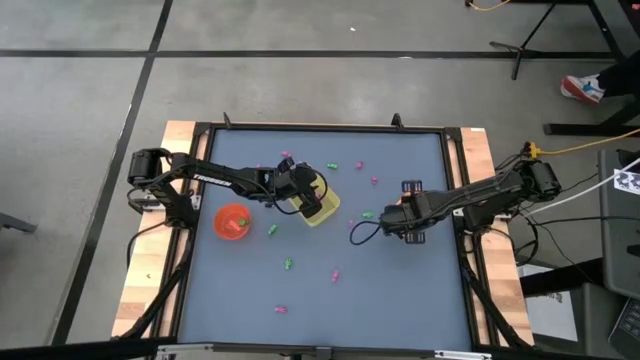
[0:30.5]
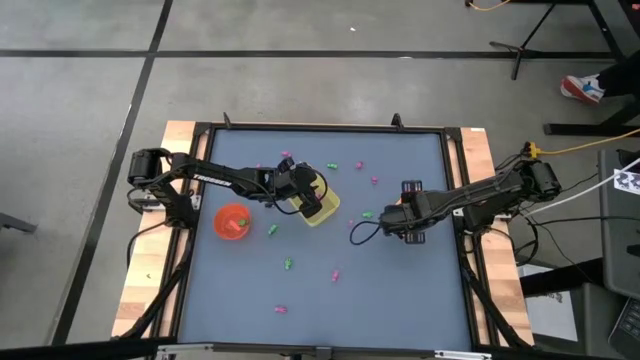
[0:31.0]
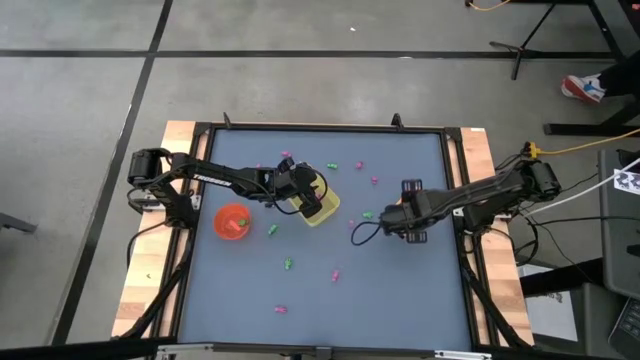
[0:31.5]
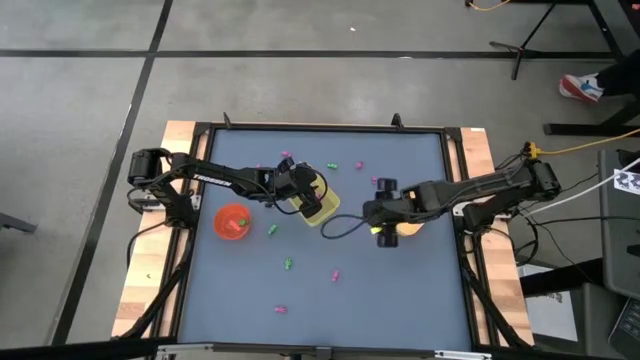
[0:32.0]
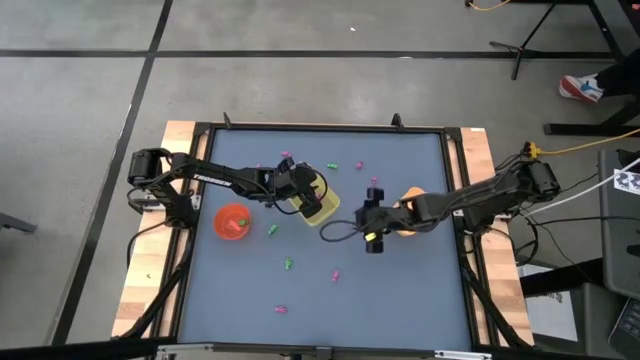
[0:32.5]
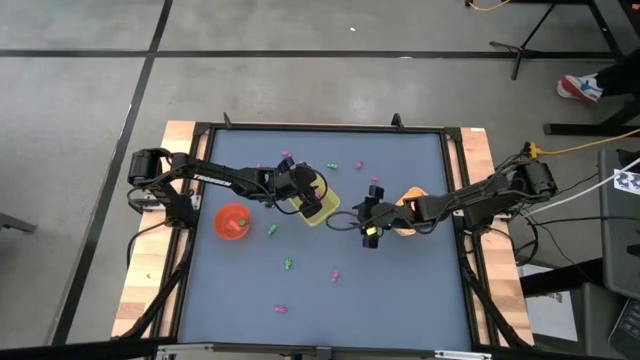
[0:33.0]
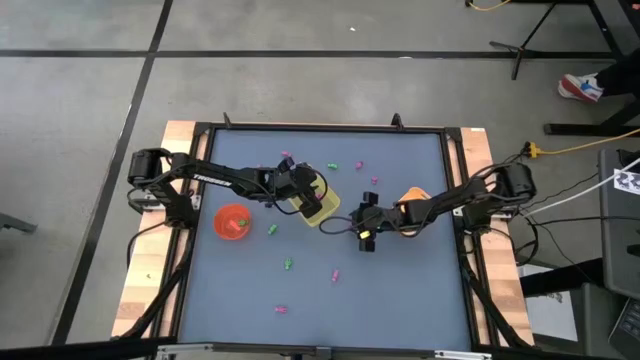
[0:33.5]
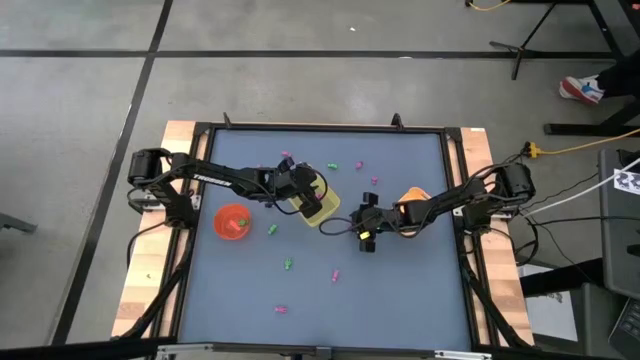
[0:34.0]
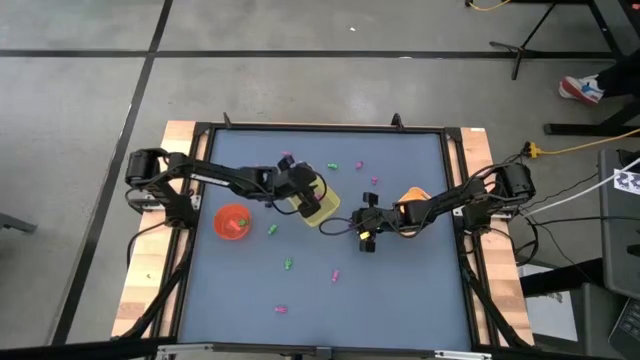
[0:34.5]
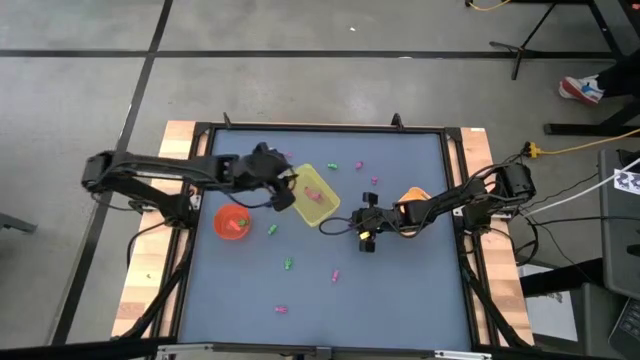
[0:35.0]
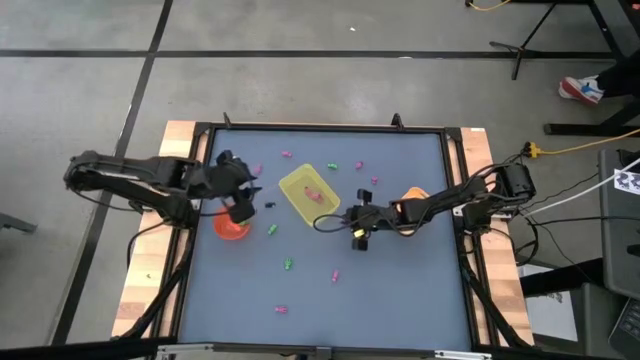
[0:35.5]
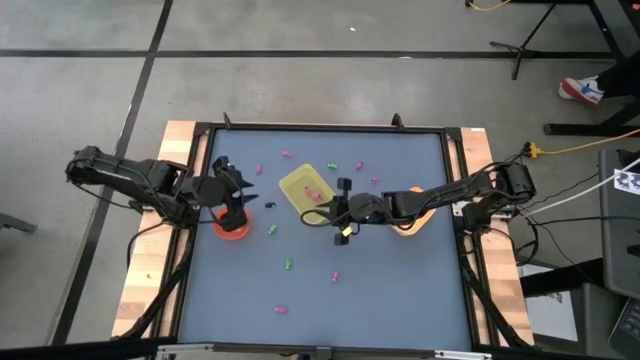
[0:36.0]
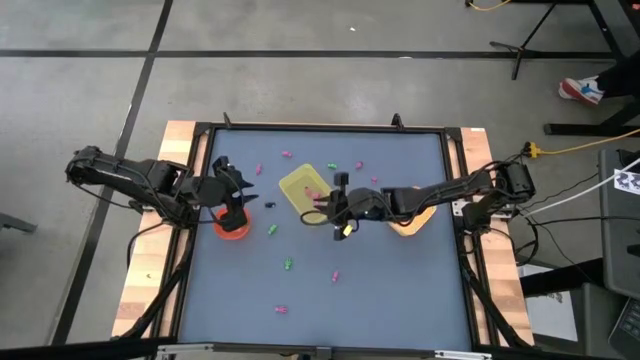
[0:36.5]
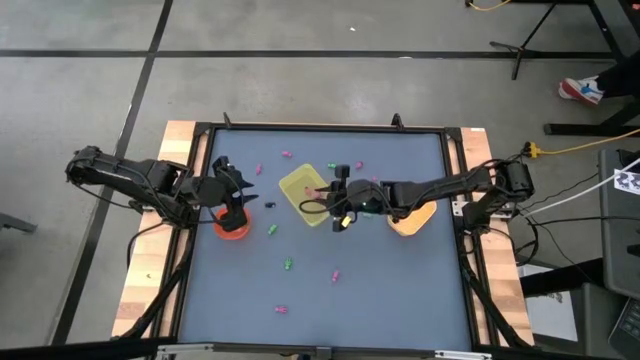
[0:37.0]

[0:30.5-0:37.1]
Task: Sort Halloween decoration
Put the pink skeleton toy into the yellow bin

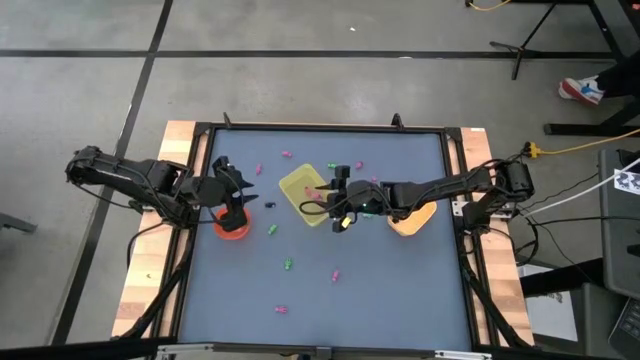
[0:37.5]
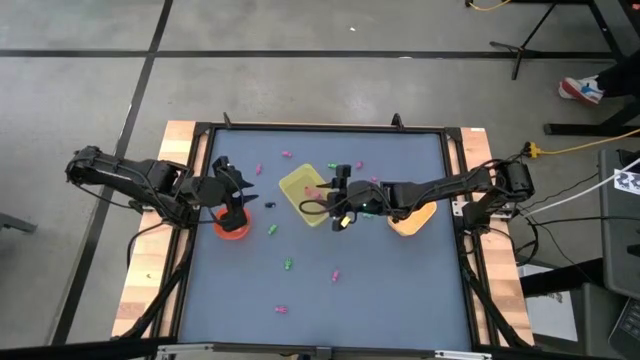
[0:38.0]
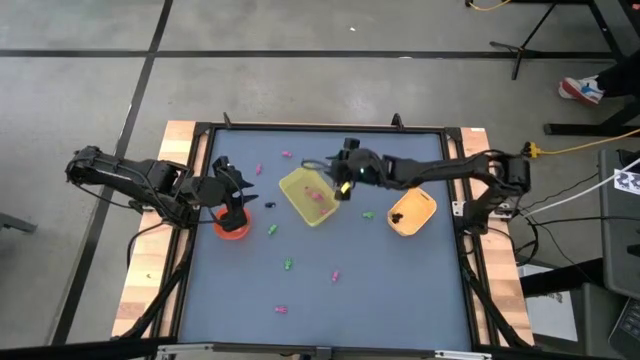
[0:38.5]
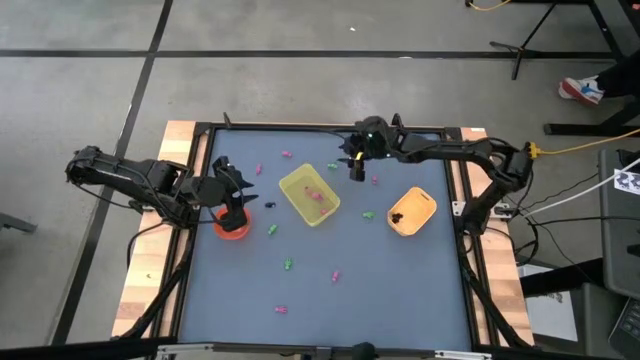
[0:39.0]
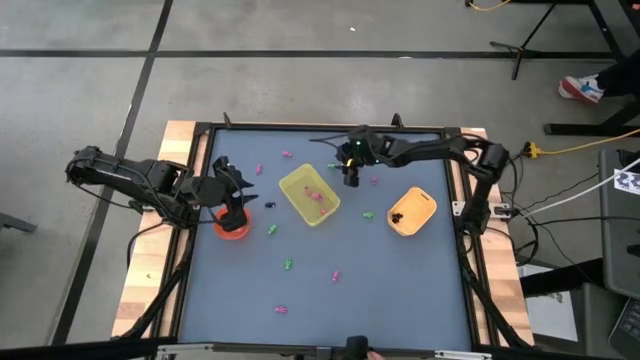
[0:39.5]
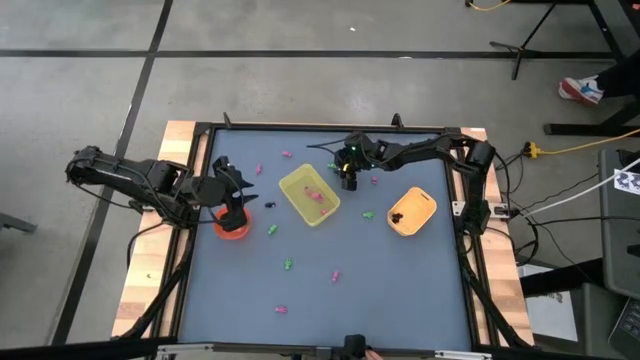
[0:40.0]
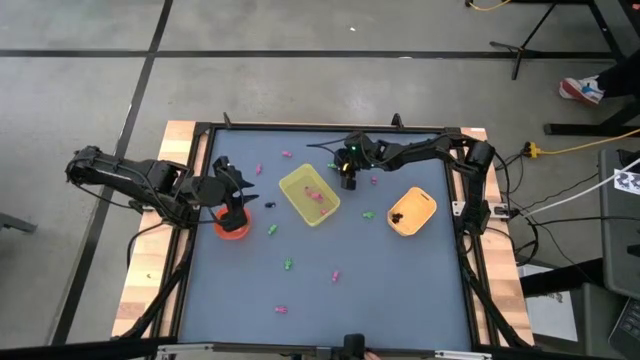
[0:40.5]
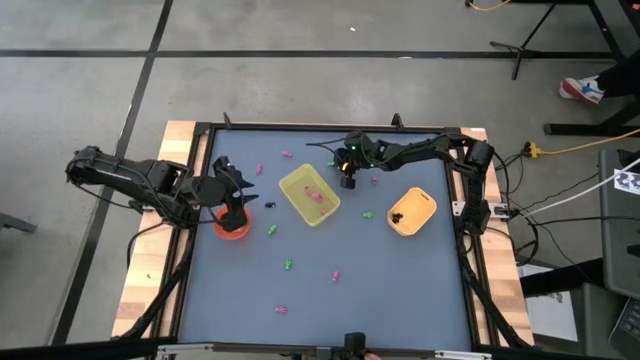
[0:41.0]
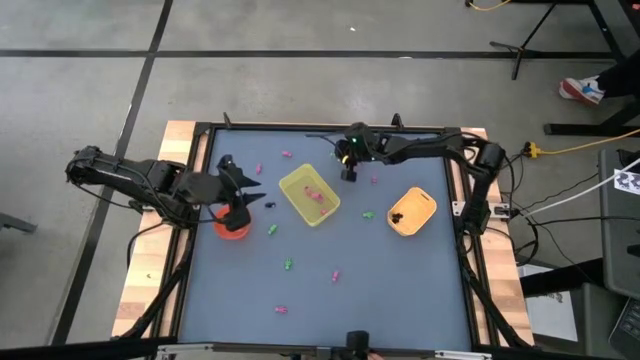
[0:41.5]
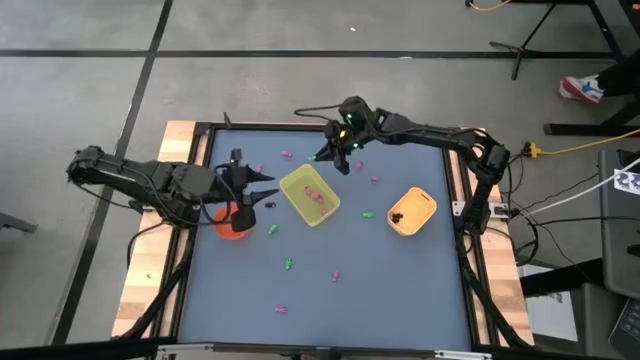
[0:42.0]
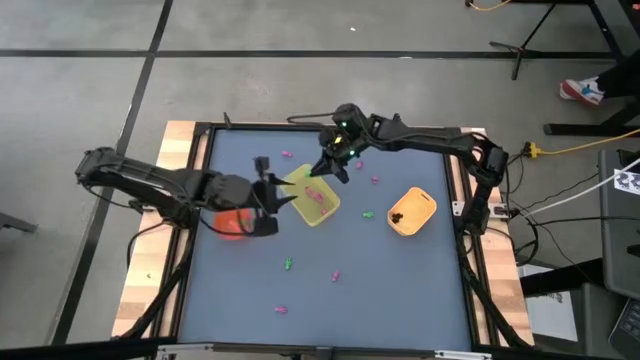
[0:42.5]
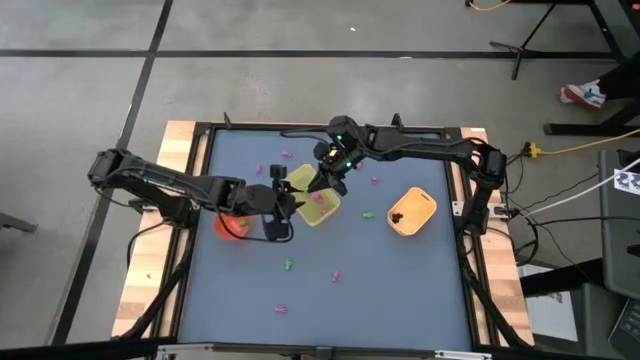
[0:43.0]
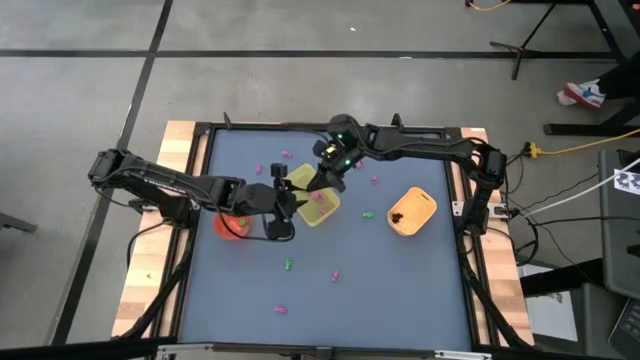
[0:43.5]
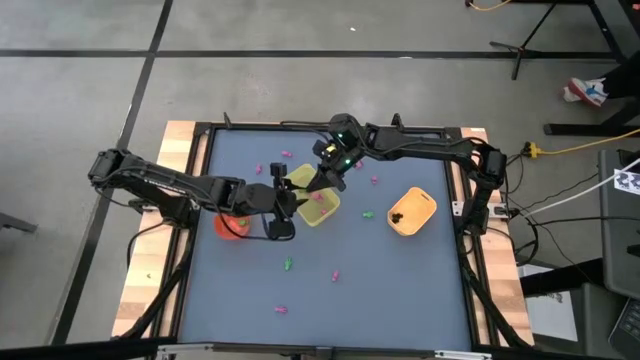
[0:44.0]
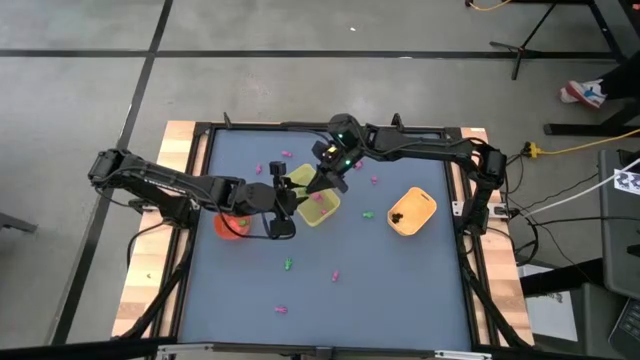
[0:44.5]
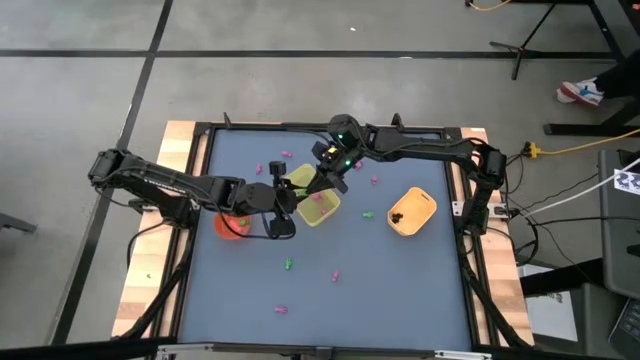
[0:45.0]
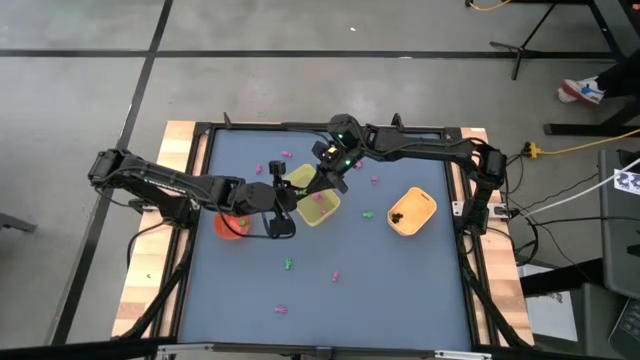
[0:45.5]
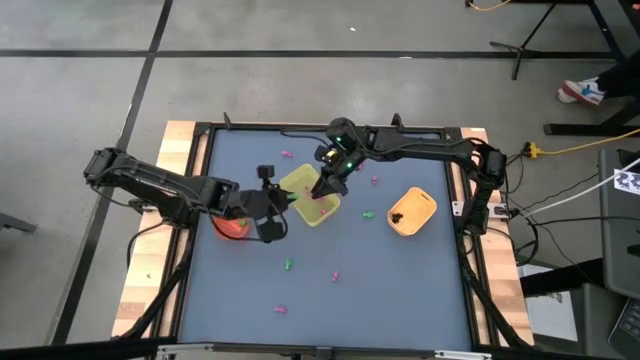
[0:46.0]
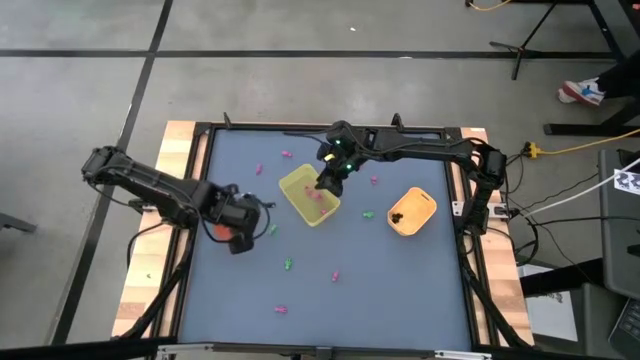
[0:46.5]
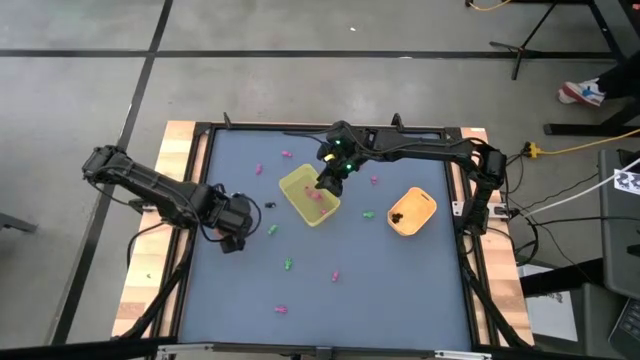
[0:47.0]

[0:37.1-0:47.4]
Put the green skeleton toy into the orange bin

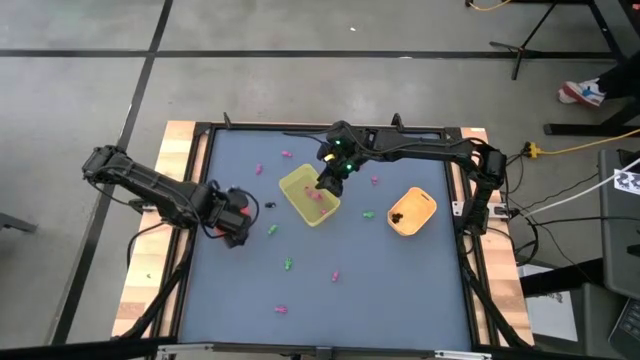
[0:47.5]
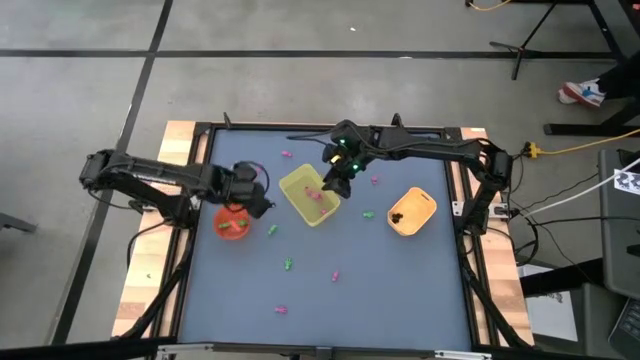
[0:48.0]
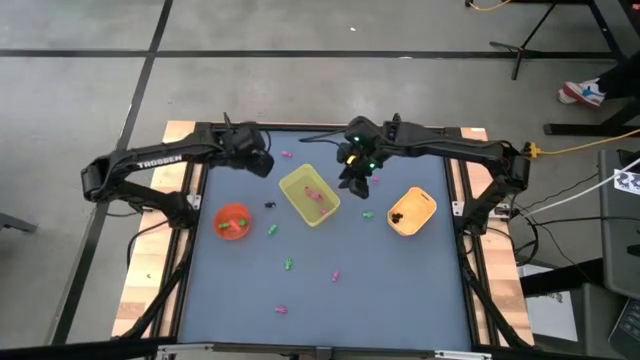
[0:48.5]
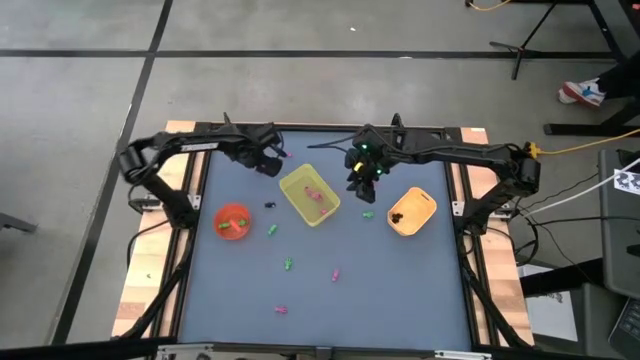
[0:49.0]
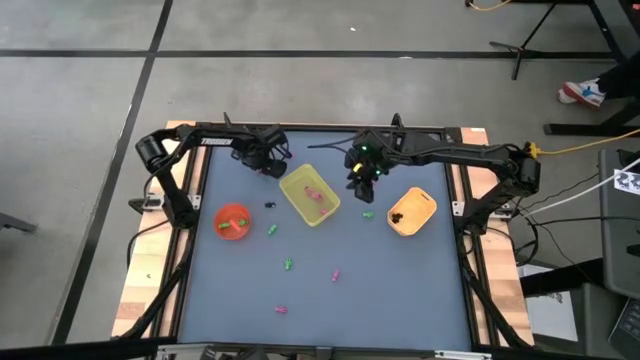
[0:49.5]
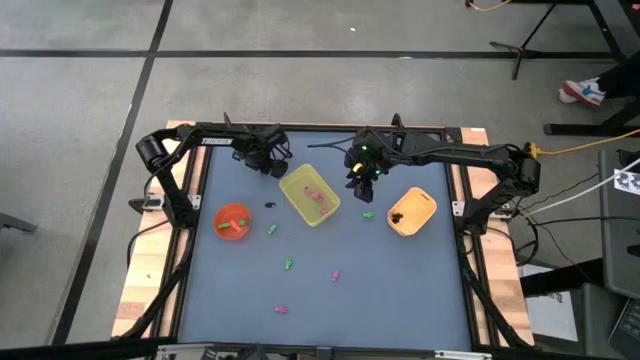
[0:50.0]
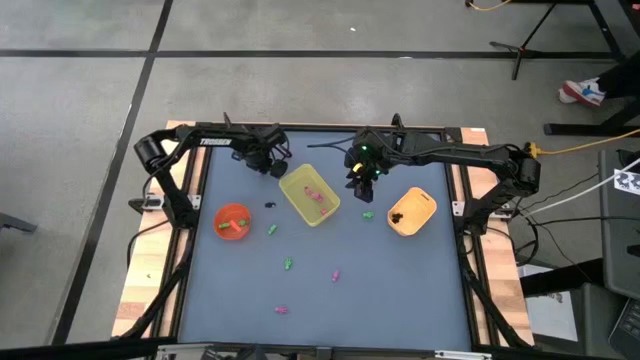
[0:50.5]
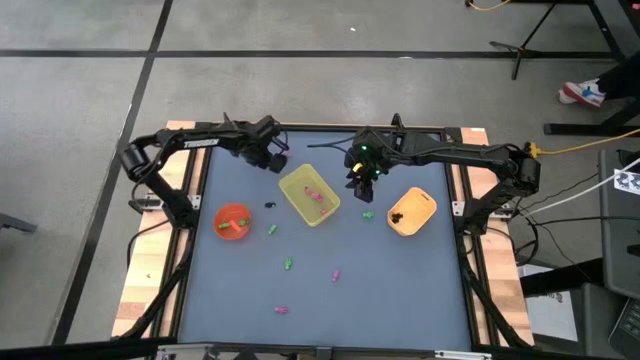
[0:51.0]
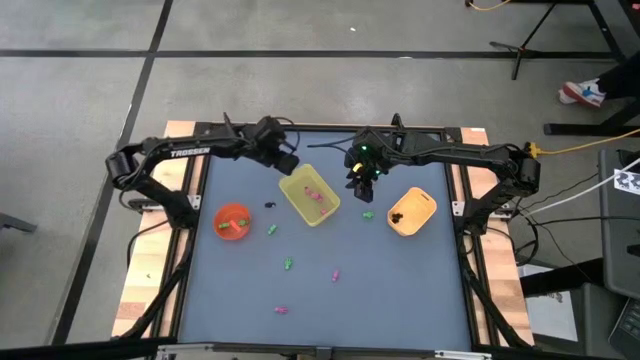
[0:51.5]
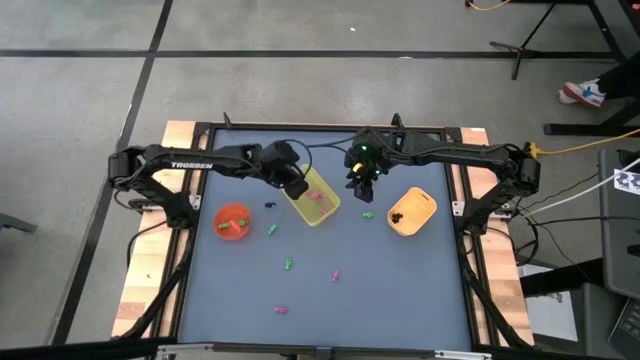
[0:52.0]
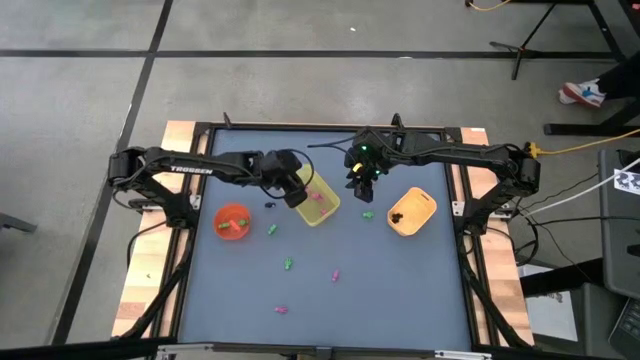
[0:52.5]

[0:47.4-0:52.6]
Put the pink skeleton toy into the left yellow bin
